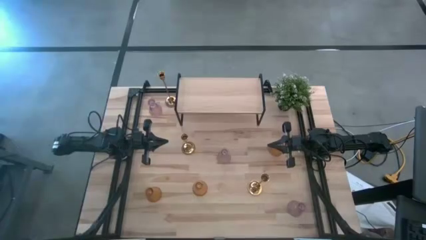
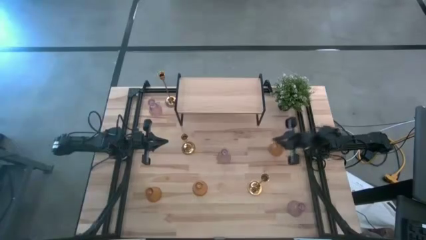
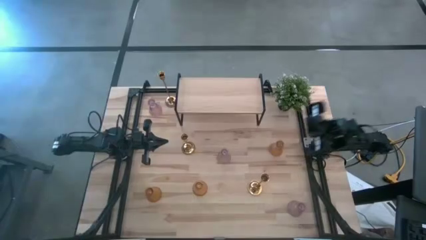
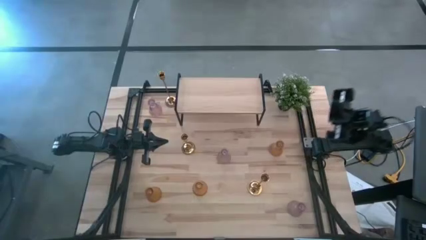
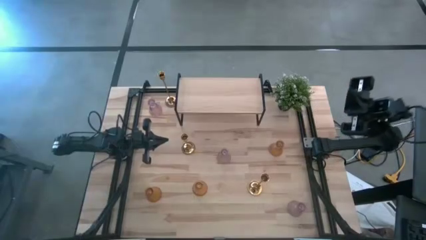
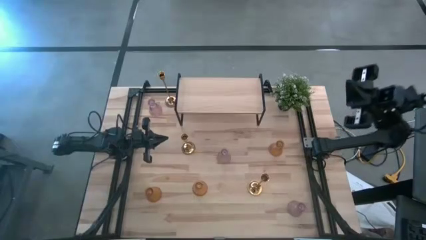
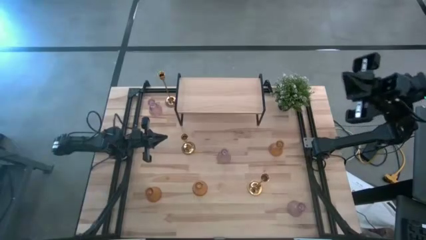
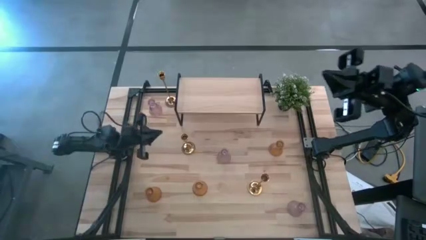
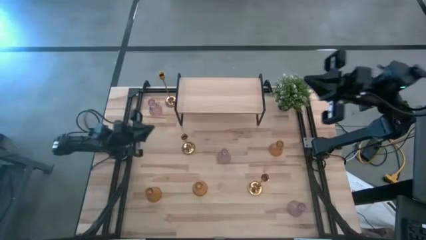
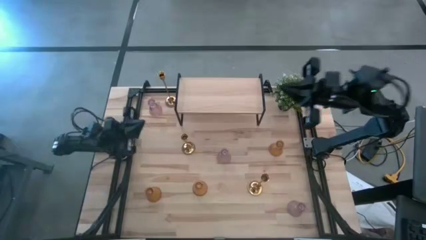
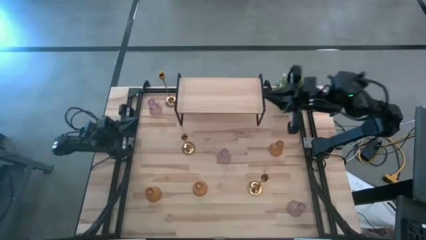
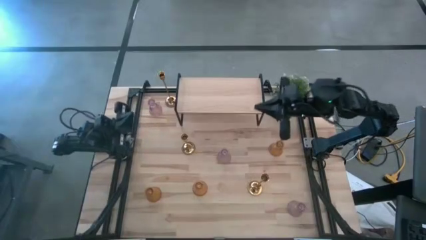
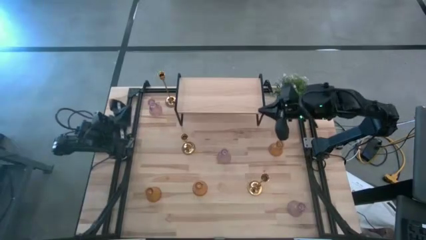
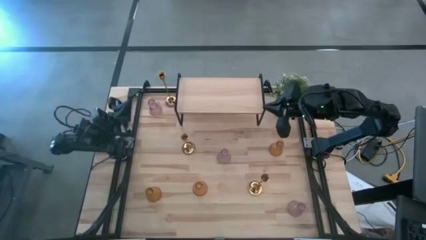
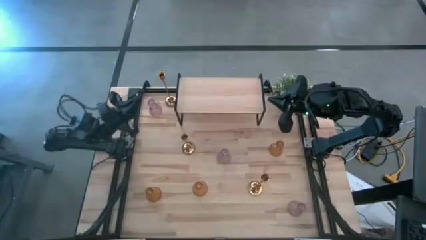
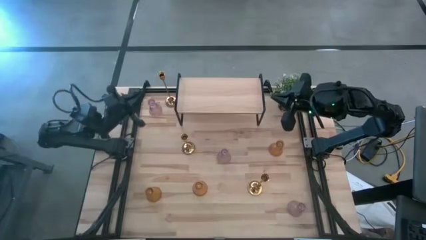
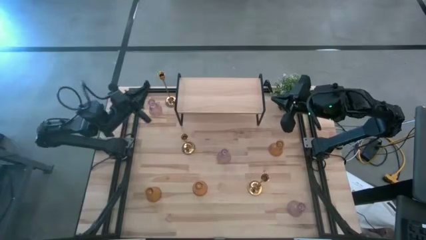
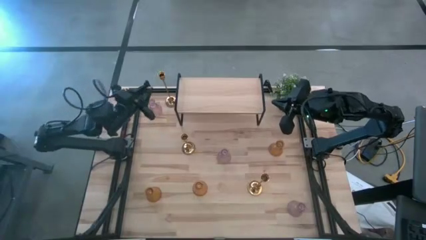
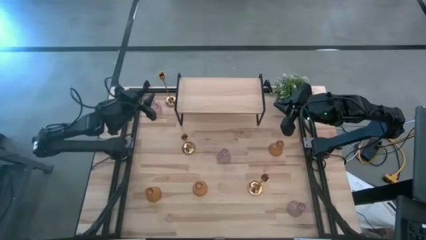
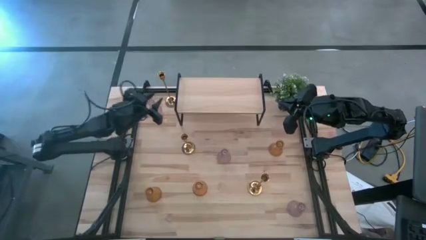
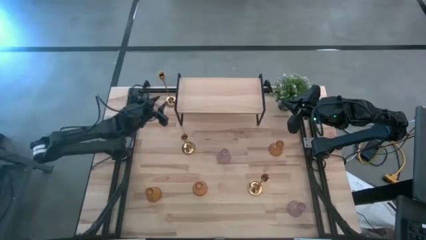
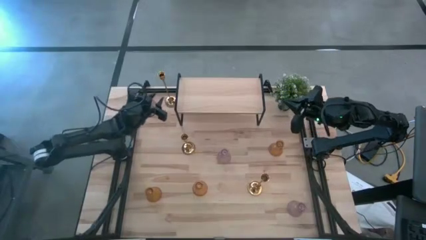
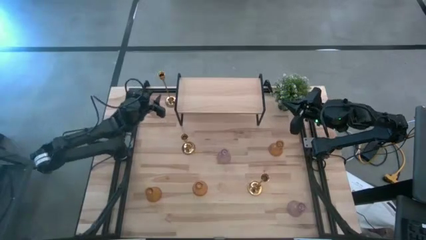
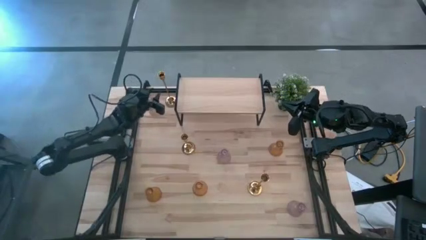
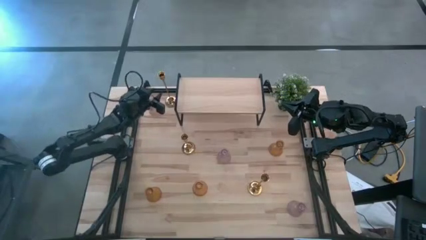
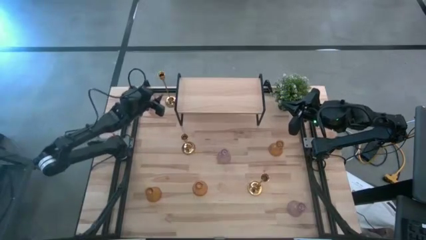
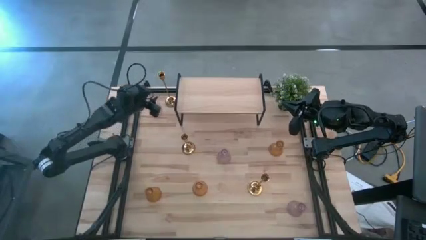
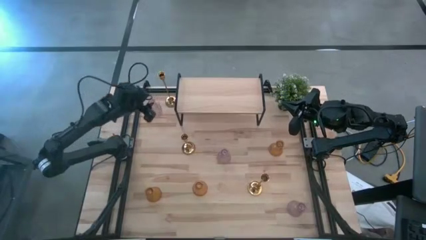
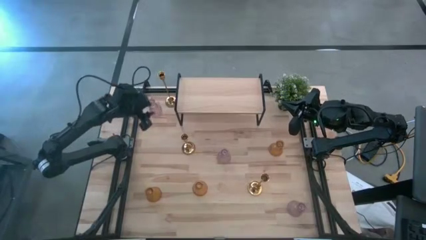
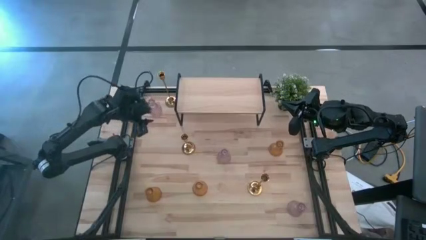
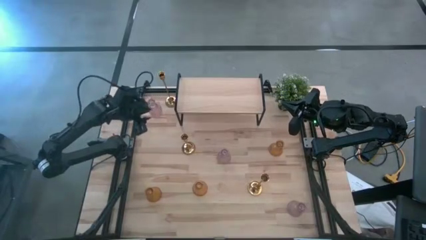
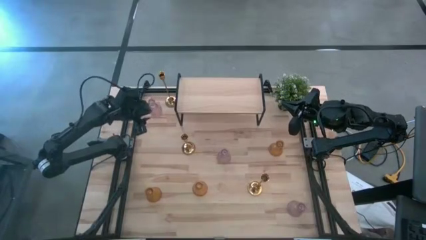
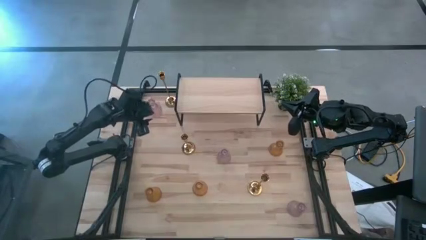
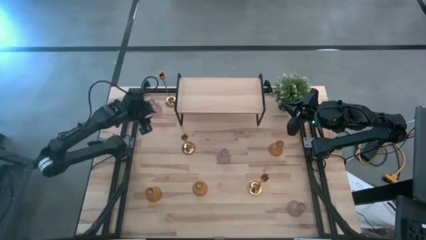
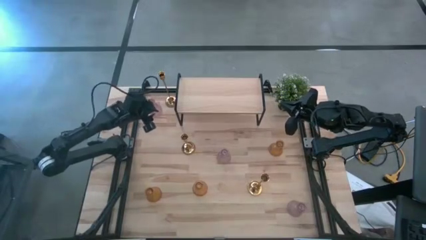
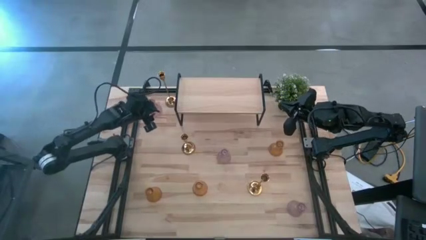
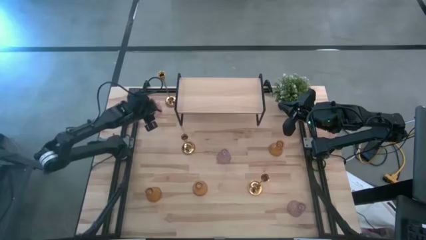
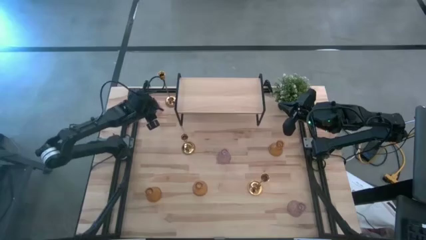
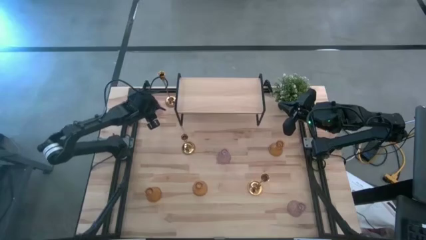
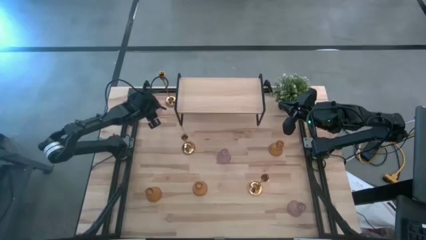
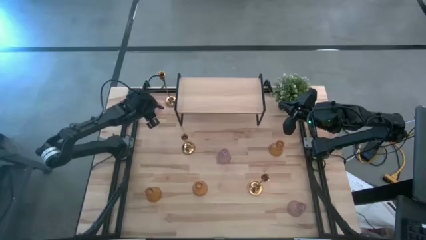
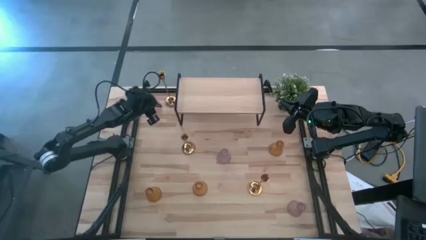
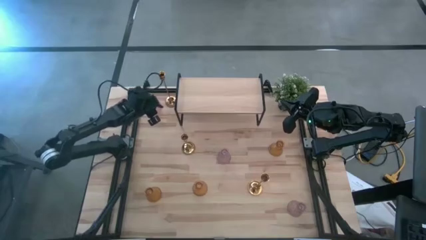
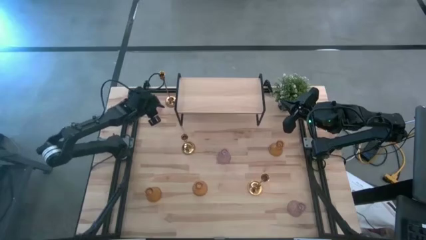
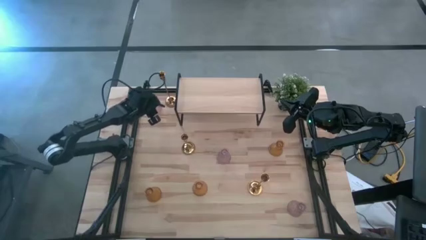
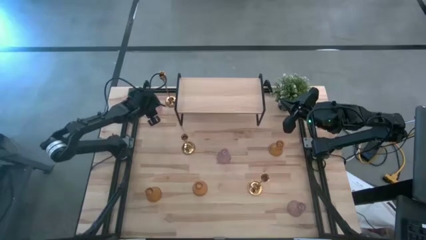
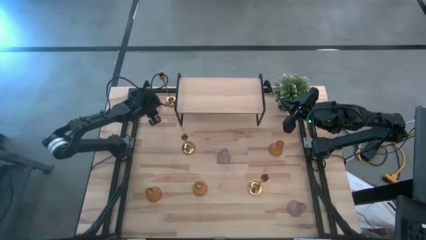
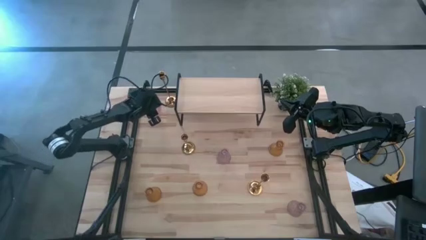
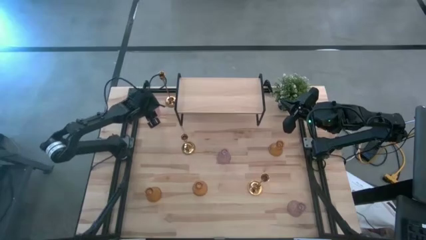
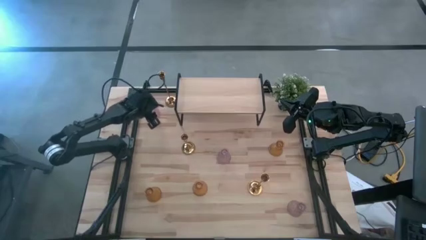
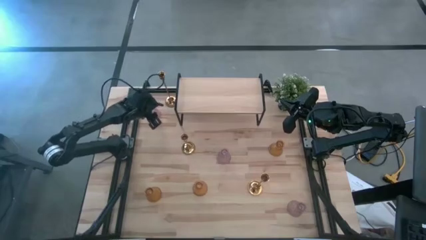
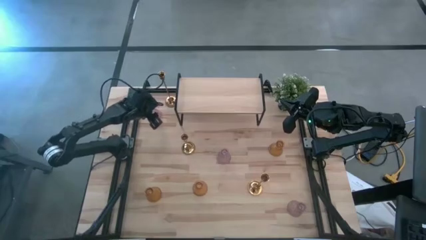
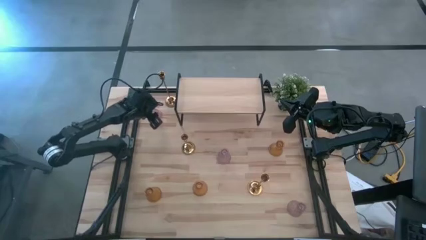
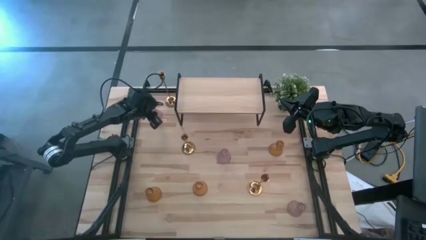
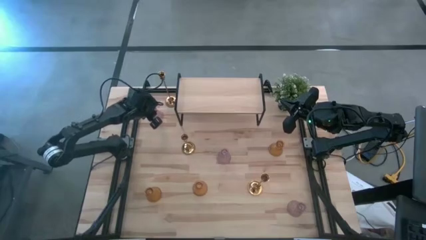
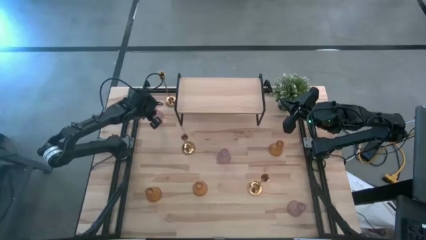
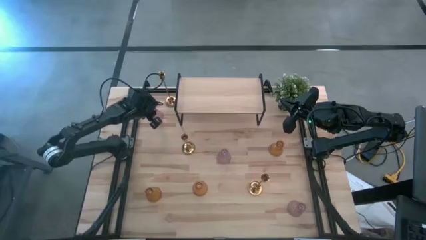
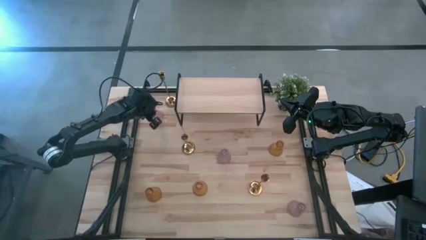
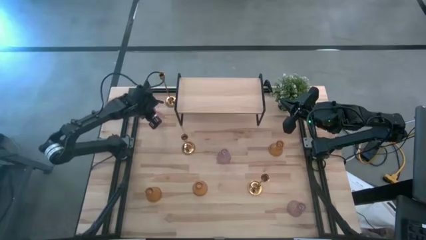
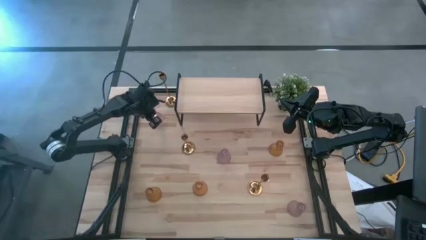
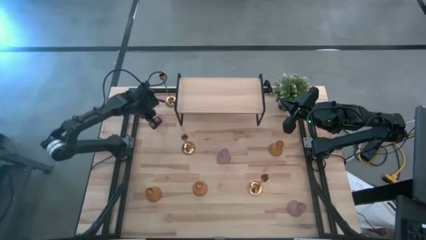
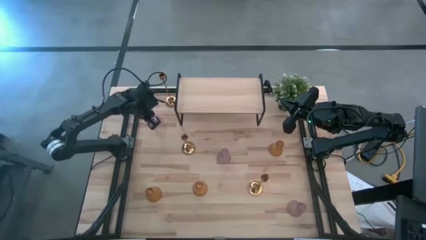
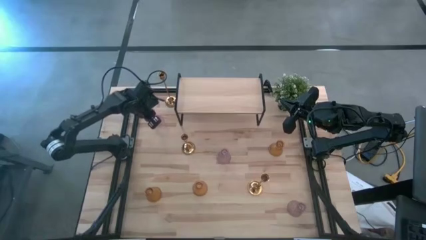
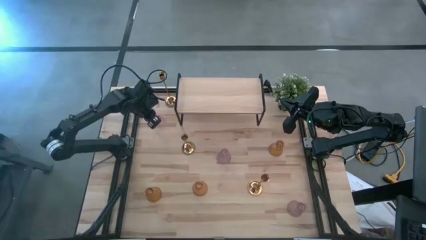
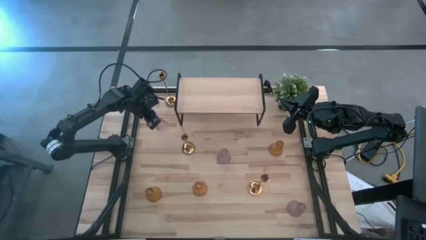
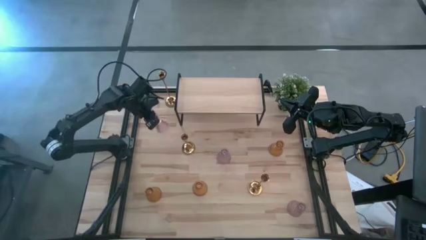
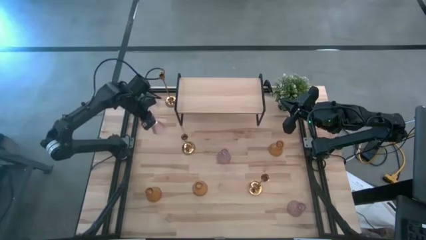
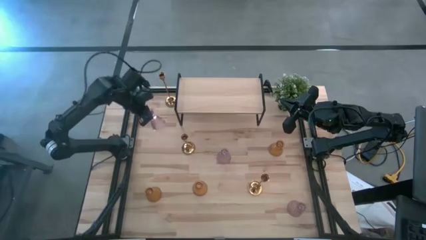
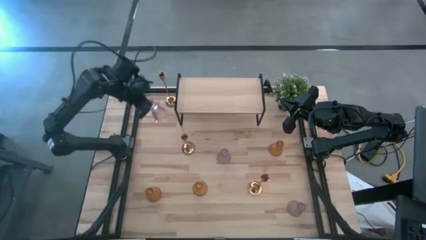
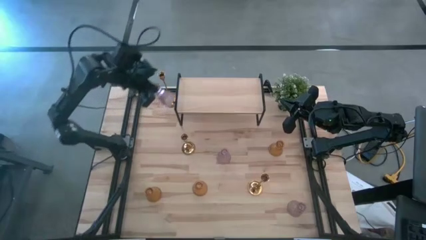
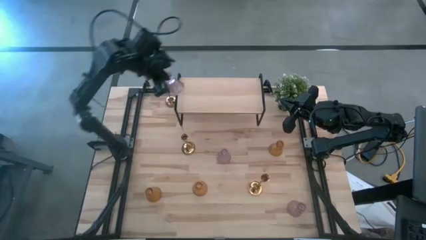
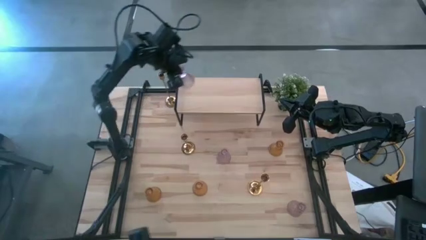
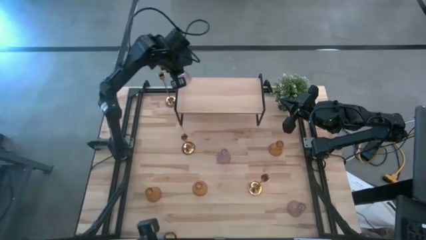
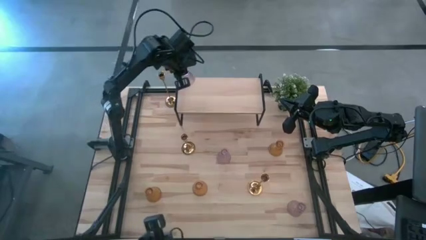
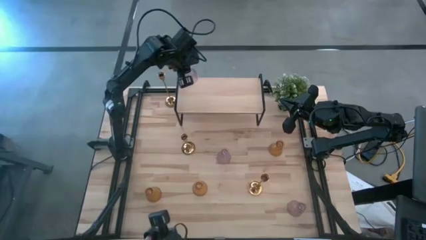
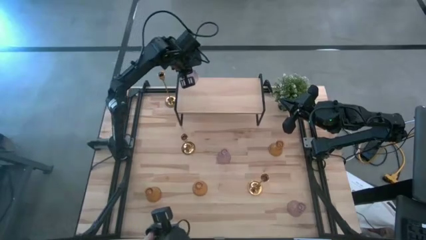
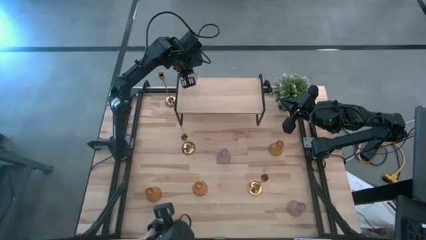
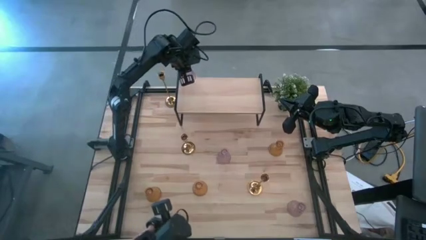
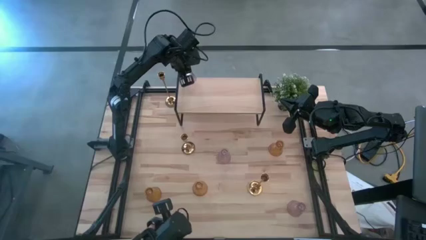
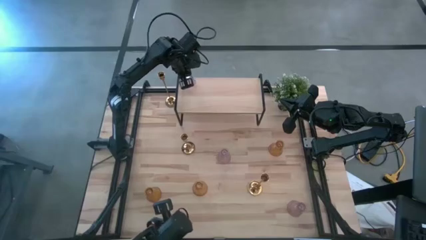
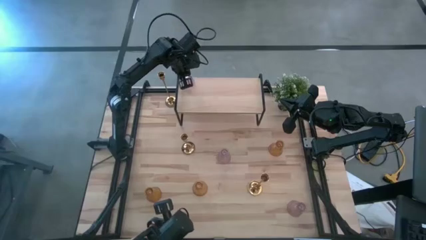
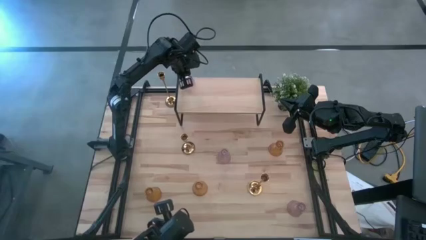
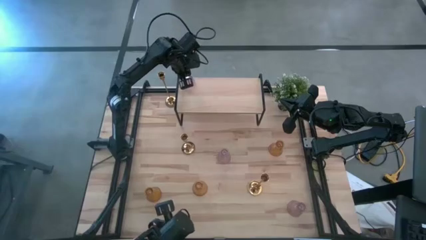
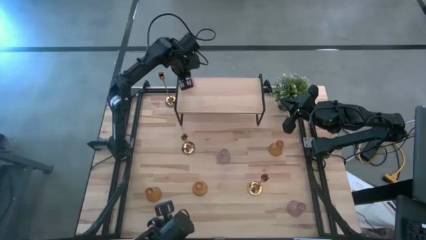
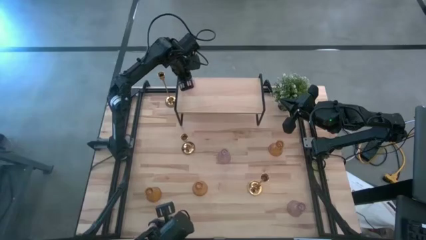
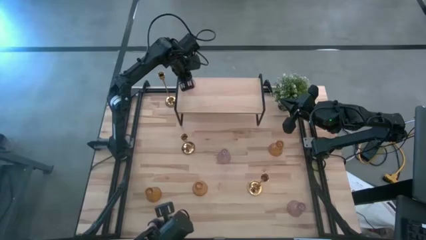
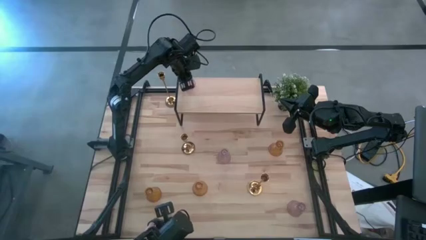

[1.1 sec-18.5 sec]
Task: Pick & Place candle stick holders
Put the top purple glass candle holder on the shelf
